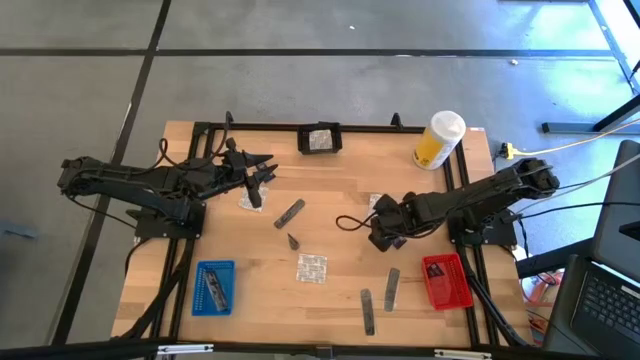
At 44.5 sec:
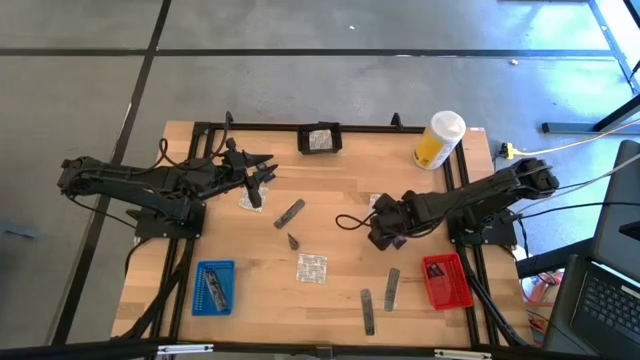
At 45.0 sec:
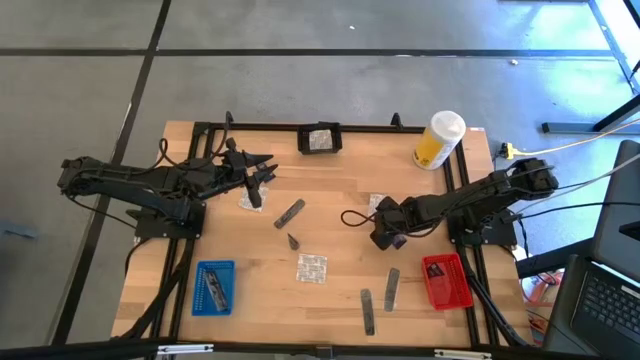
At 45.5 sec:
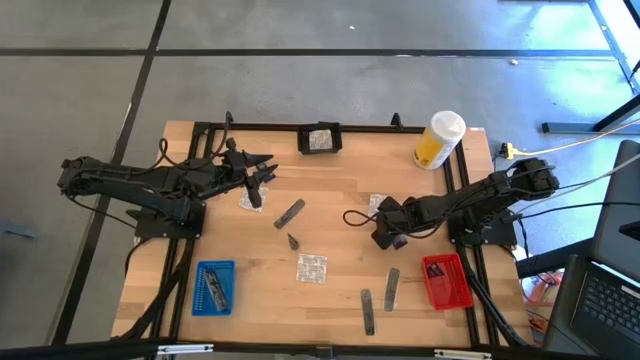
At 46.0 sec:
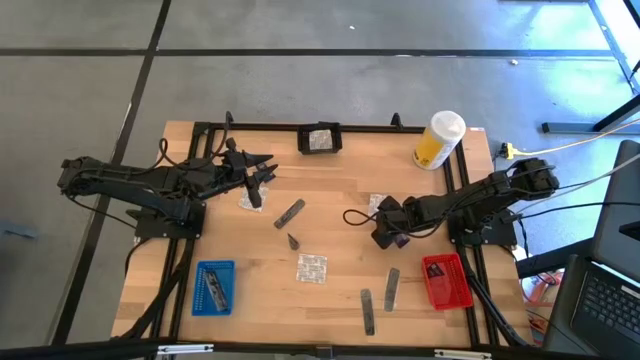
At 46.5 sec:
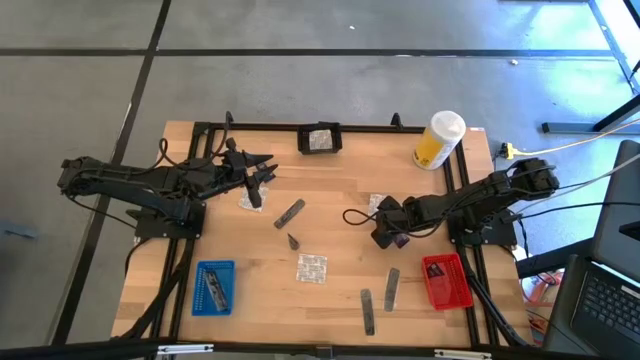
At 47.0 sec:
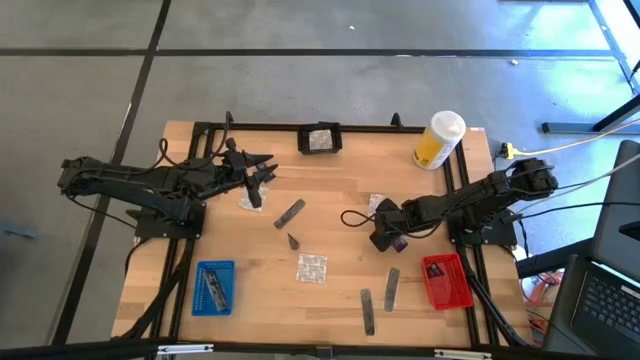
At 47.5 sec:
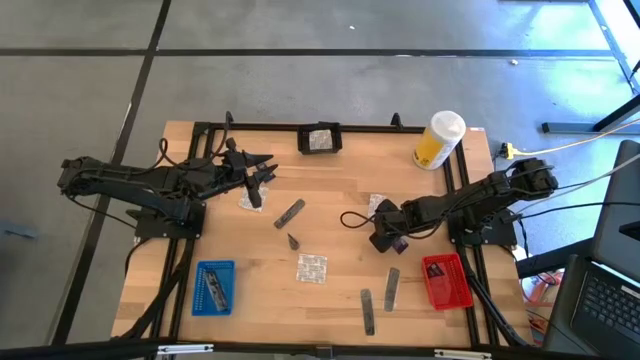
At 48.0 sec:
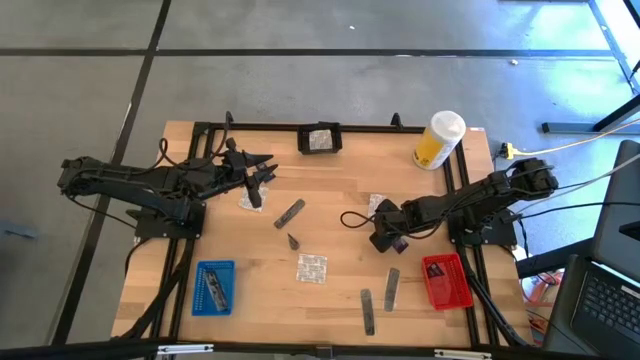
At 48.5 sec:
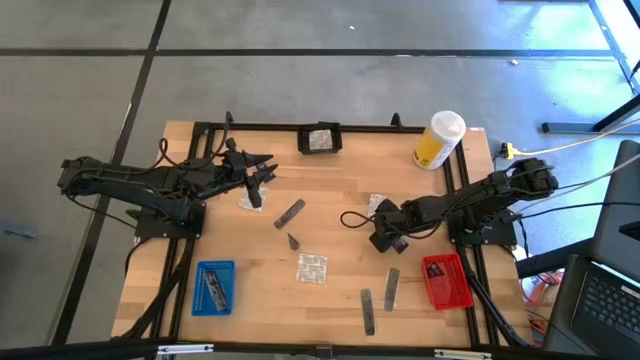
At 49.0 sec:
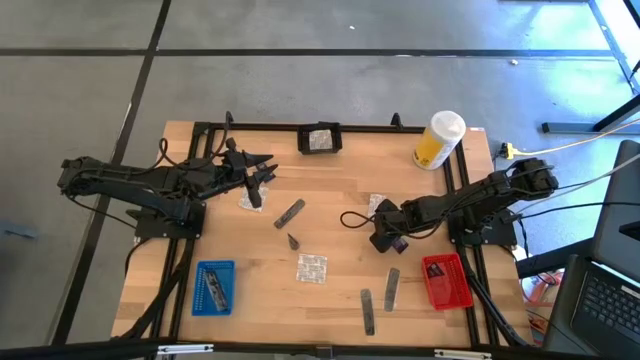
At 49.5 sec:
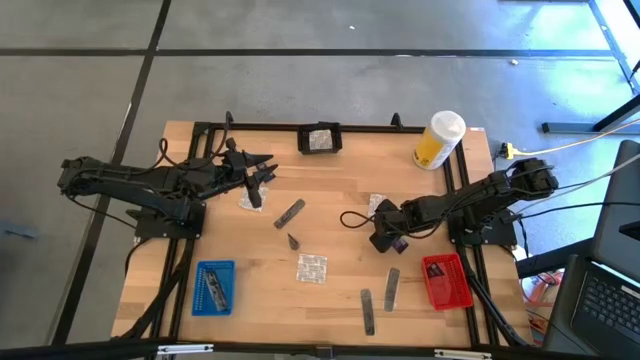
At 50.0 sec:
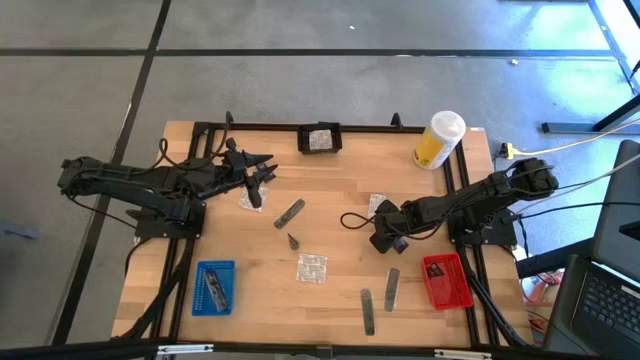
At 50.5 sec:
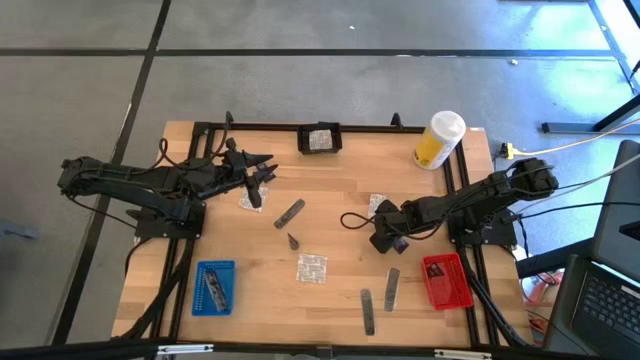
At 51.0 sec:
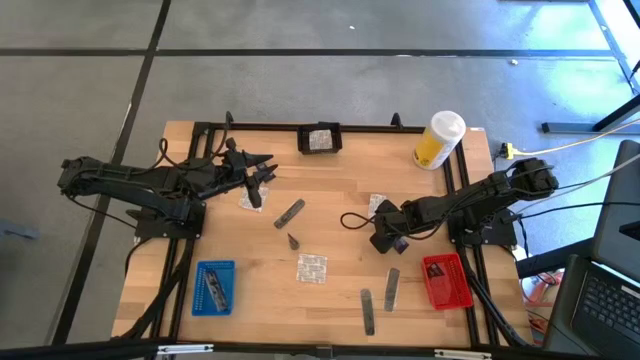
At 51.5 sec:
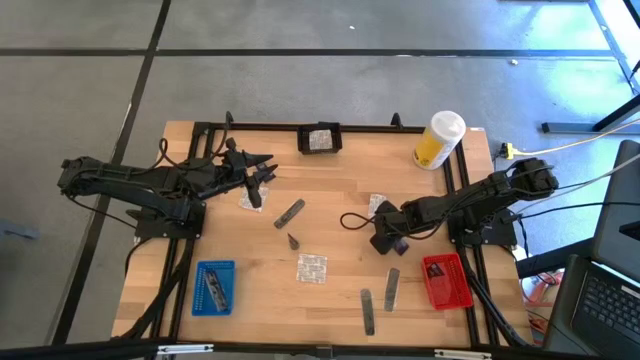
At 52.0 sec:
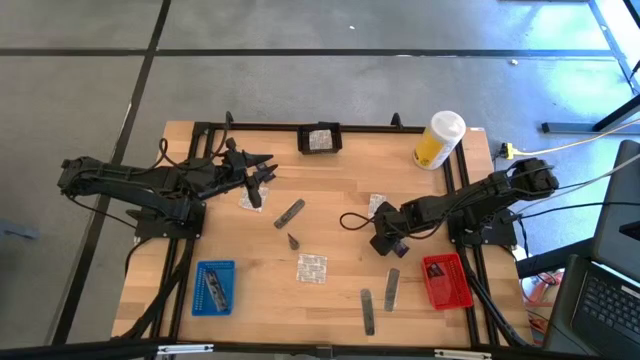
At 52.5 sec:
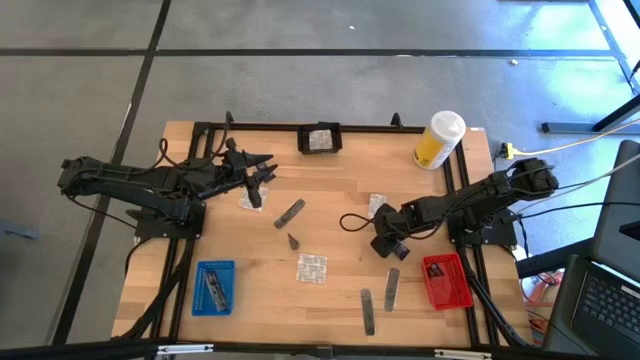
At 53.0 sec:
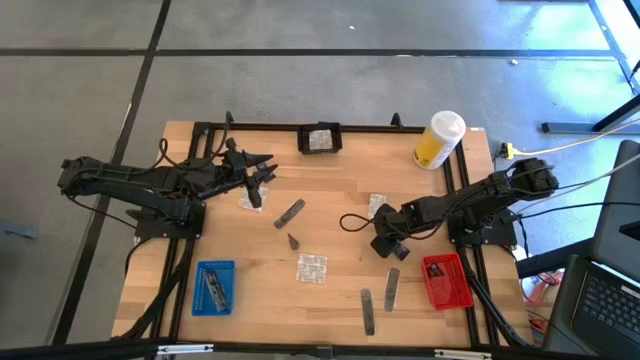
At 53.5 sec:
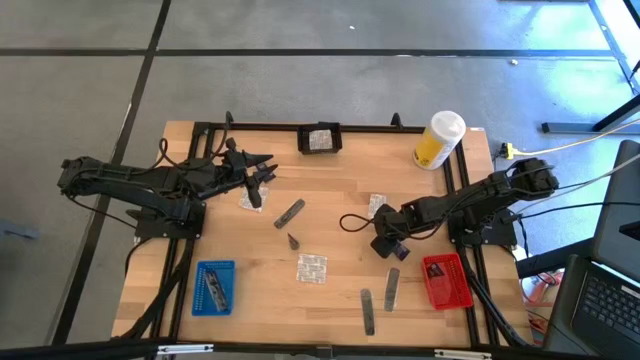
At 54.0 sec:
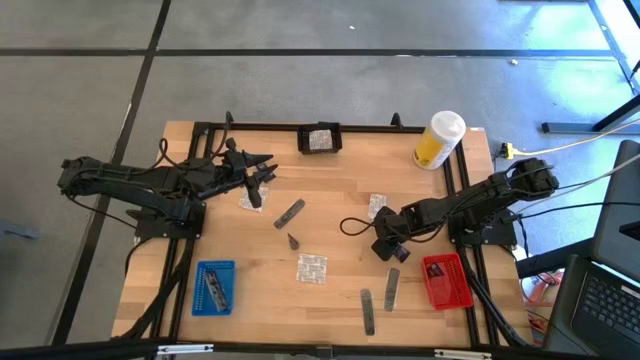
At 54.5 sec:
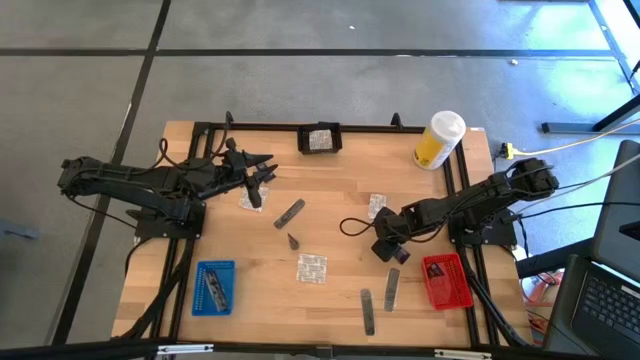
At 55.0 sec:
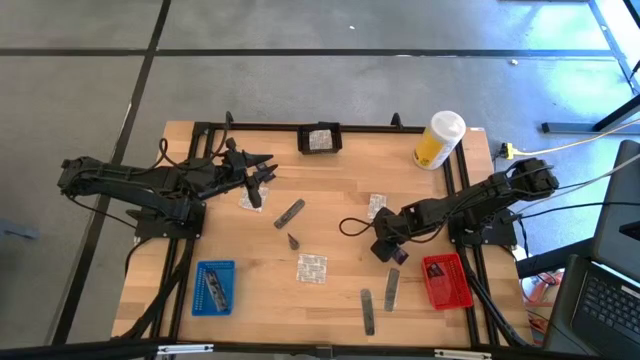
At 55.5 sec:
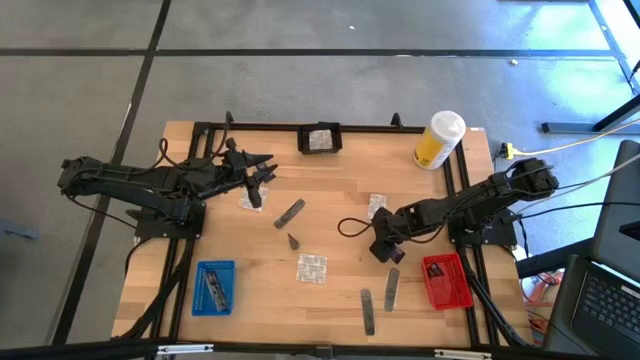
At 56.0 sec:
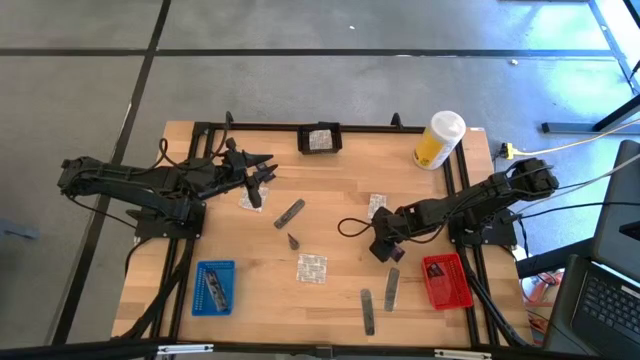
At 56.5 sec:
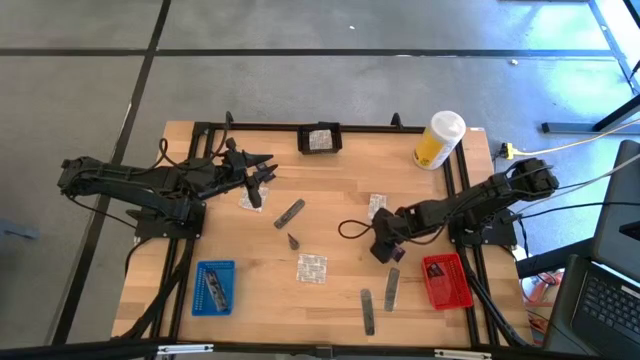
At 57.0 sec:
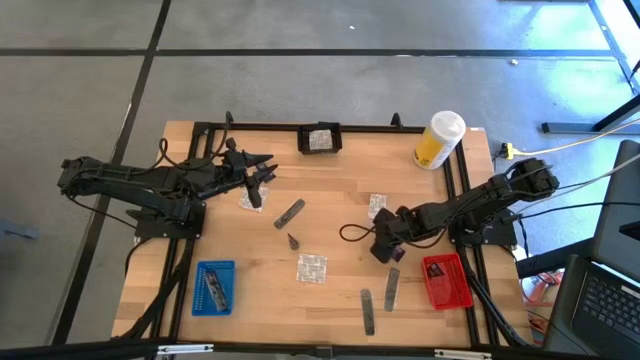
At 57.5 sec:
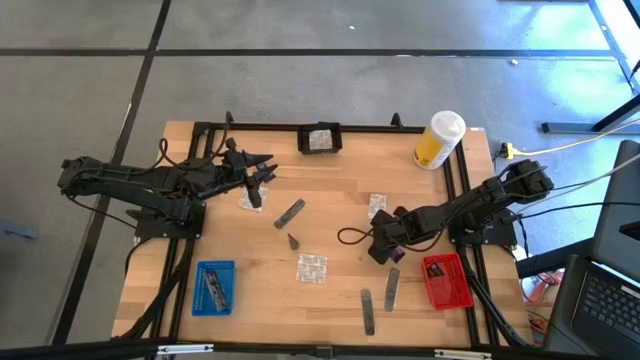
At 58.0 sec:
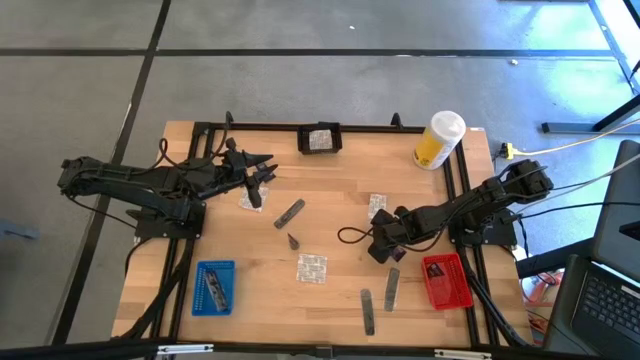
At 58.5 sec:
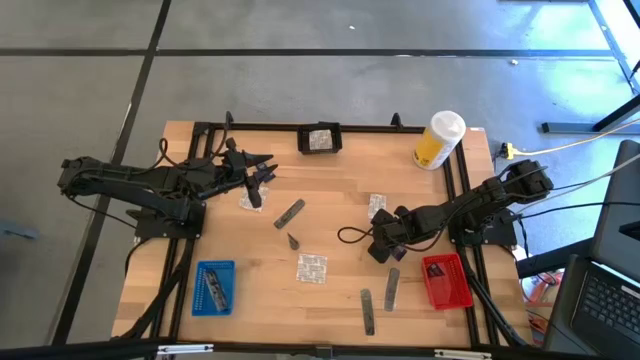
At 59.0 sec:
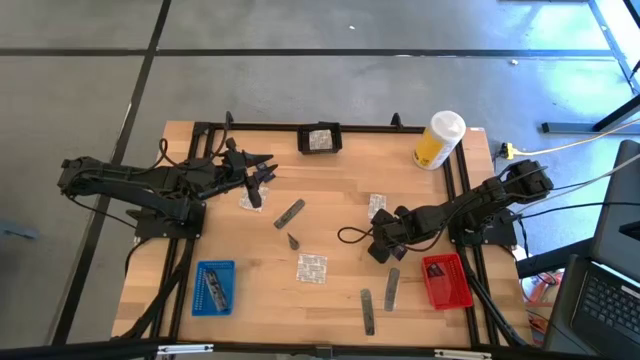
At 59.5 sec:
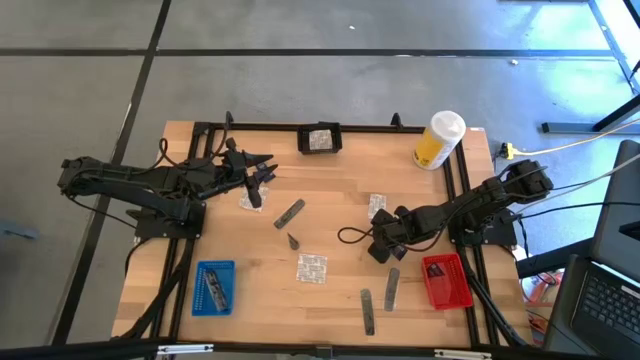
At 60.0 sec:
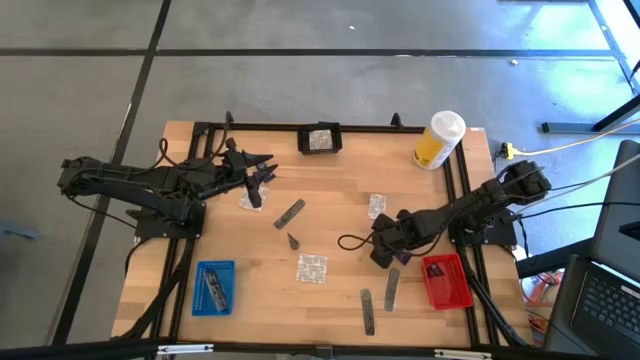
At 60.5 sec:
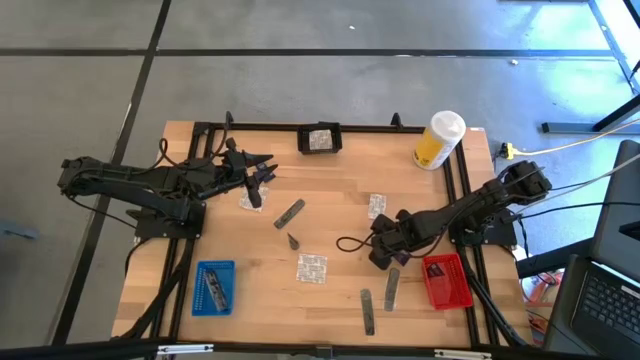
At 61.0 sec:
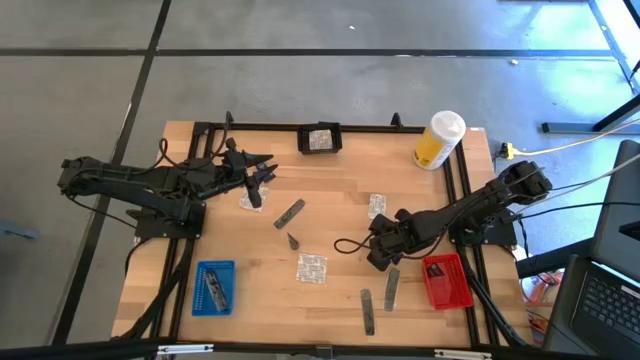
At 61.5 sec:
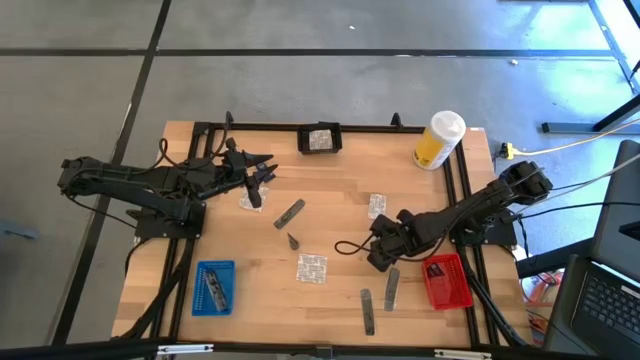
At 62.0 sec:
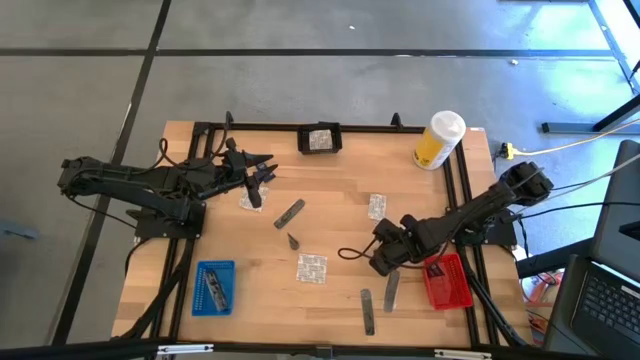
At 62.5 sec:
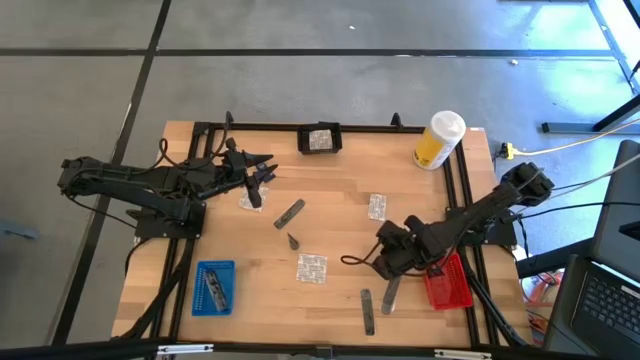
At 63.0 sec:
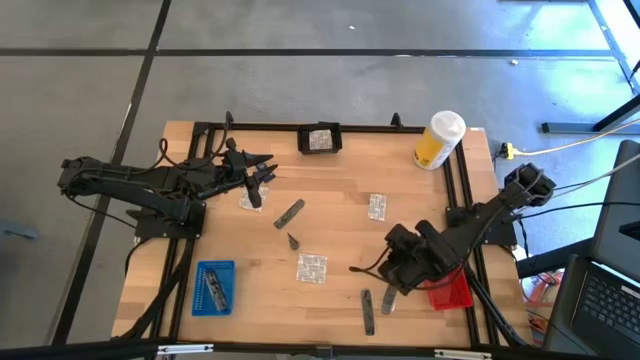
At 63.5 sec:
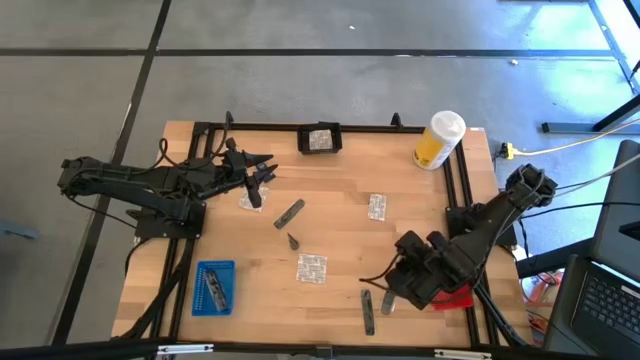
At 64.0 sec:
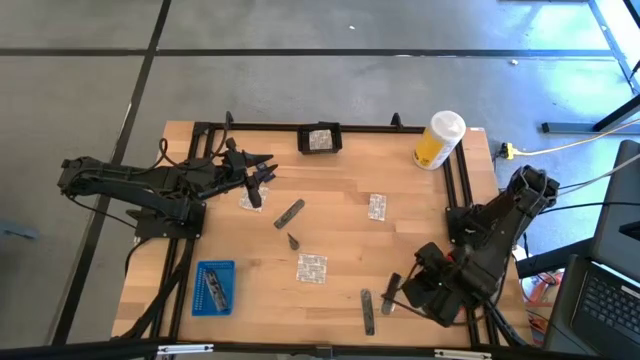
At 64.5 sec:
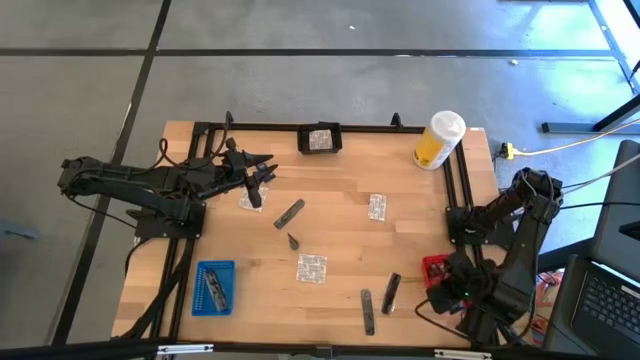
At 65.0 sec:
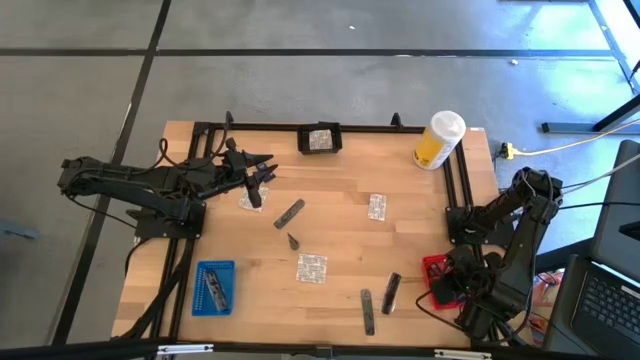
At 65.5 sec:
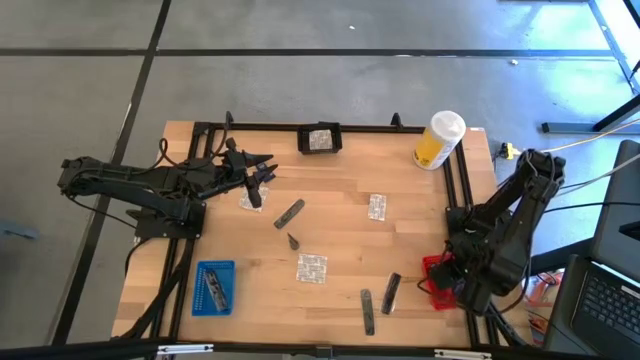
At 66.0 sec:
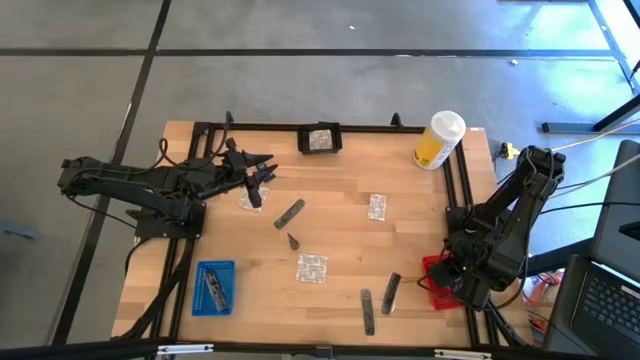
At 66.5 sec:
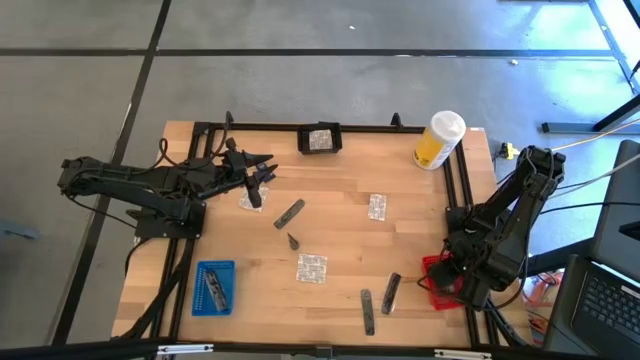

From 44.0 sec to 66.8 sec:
Task: Pick & Place Travel size toiletries
Put the blue shave butter into the red bin
